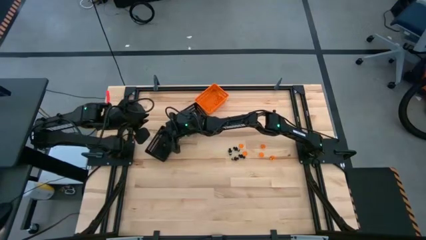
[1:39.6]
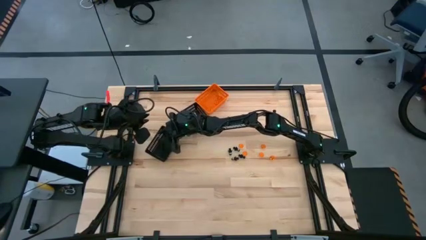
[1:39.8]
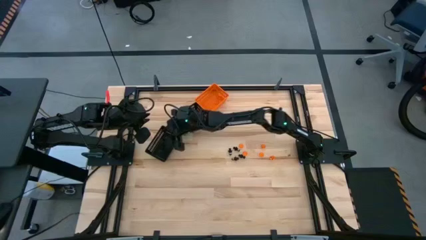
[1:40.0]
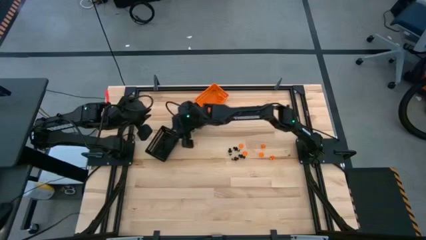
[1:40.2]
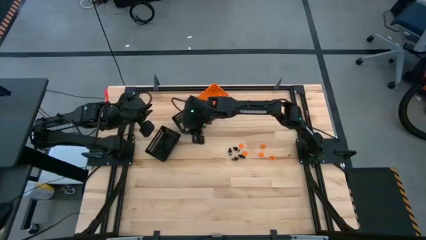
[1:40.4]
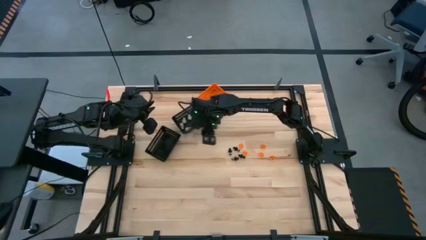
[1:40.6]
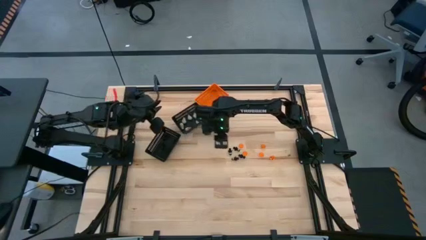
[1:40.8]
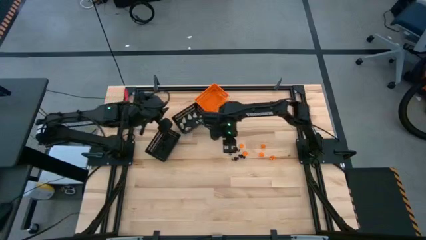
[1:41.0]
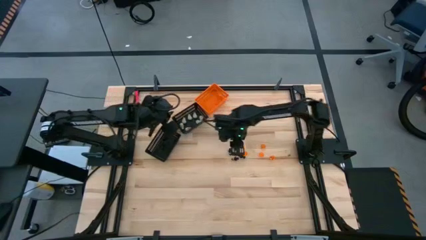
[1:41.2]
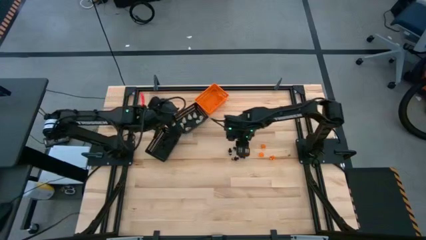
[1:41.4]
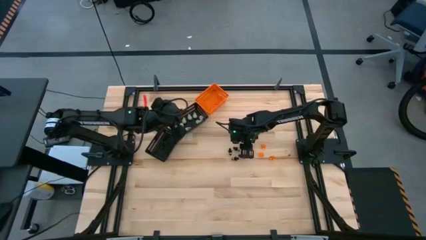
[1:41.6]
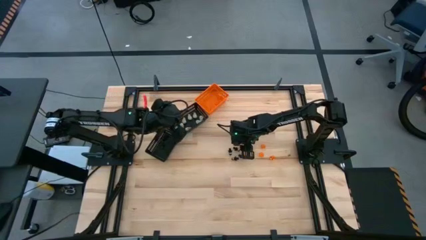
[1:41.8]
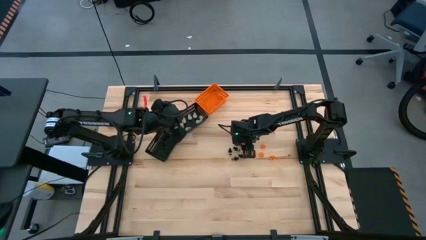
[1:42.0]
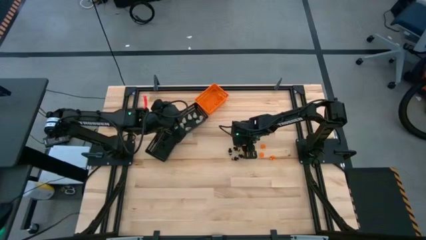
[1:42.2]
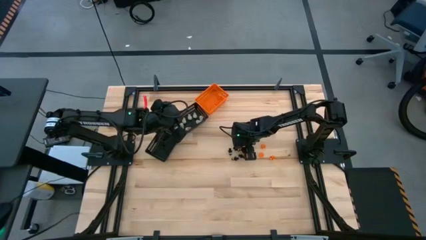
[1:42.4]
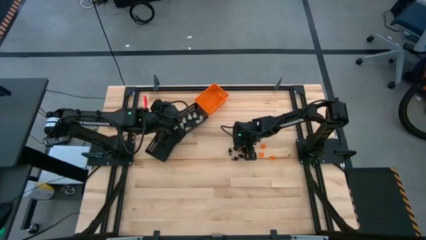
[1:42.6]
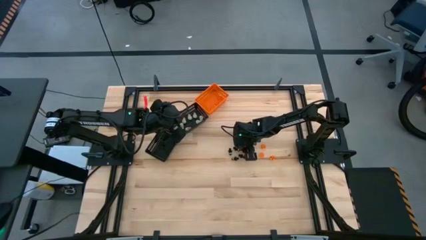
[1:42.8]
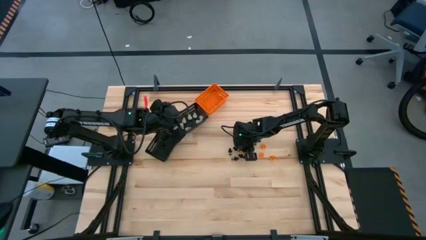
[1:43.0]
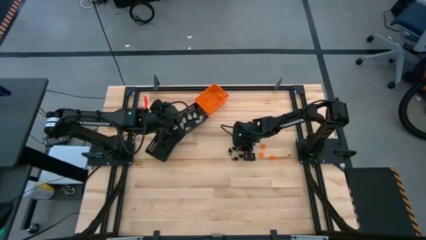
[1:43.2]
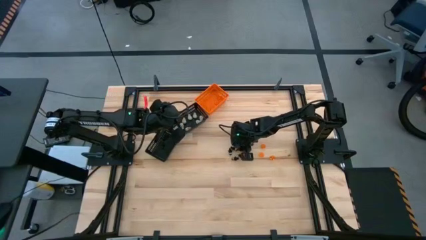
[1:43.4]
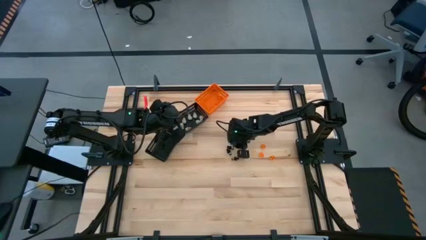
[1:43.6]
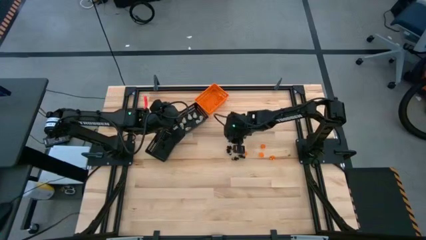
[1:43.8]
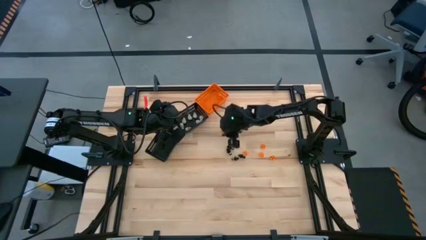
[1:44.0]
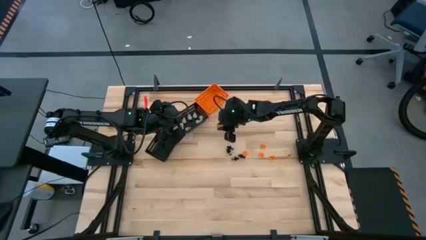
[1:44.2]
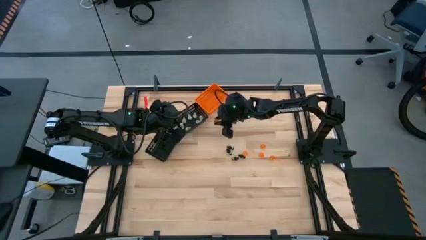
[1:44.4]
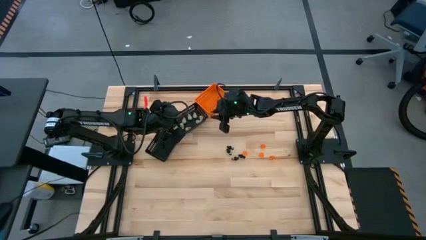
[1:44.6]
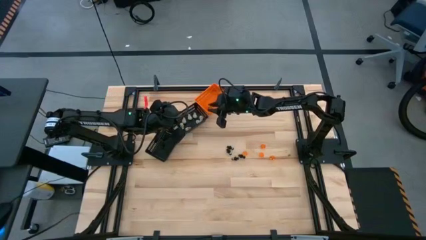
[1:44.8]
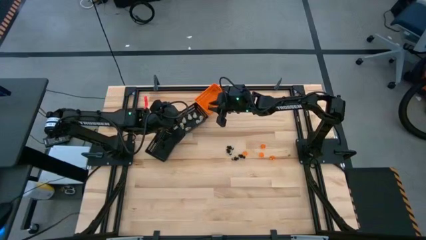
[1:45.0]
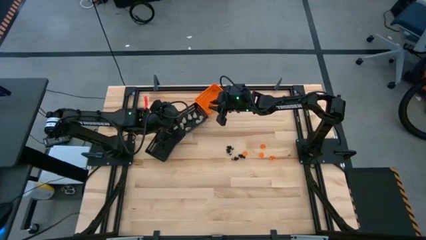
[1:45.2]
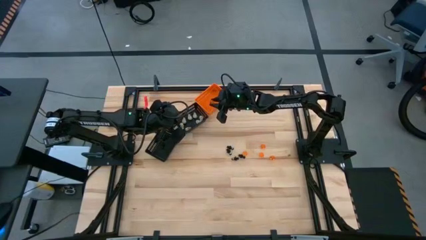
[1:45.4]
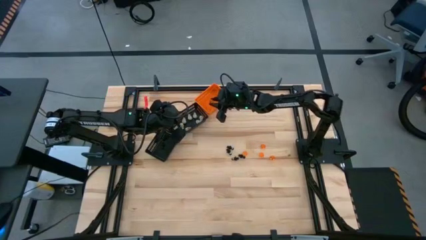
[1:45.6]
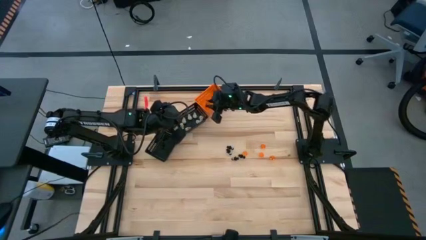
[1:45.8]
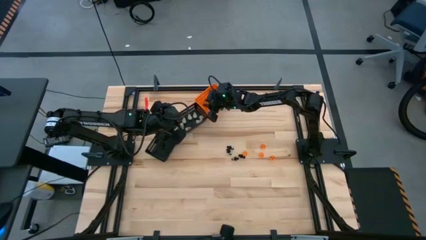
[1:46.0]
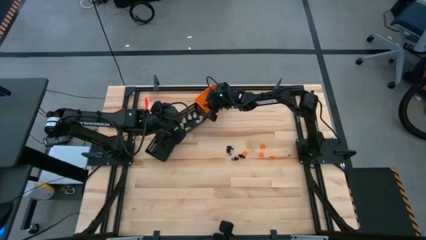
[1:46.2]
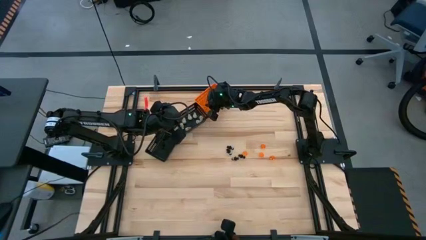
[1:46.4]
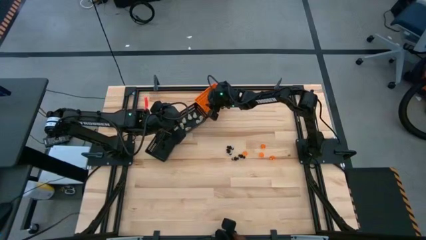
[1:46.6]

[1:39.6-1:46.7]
Task: Sort Halloween decoration
Put the orange pumpkin toy into the orange bin

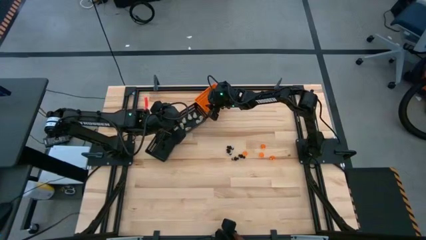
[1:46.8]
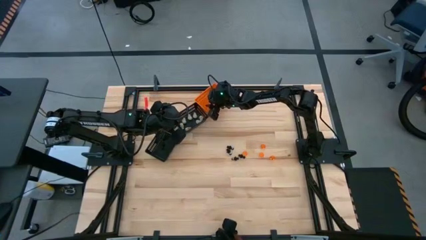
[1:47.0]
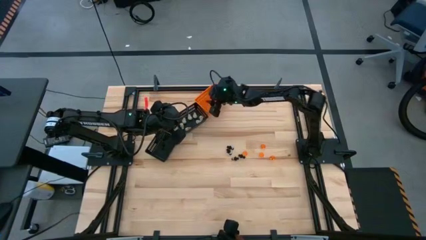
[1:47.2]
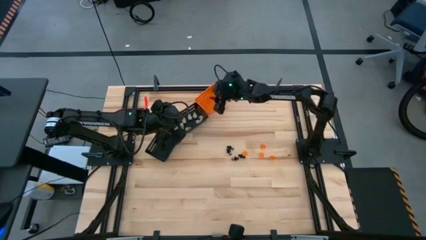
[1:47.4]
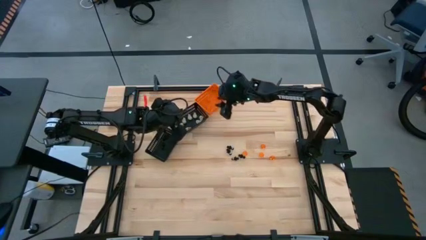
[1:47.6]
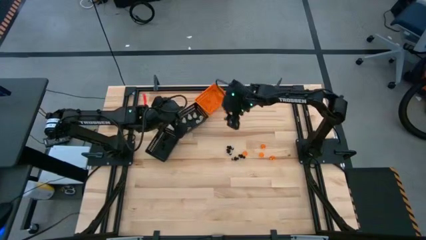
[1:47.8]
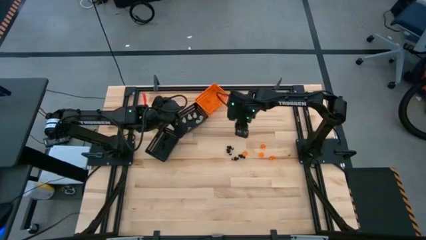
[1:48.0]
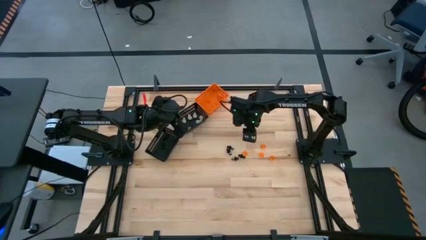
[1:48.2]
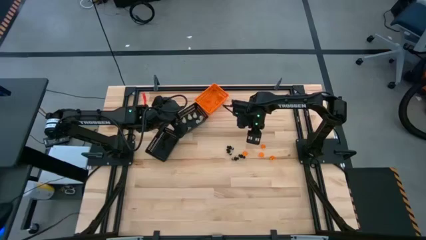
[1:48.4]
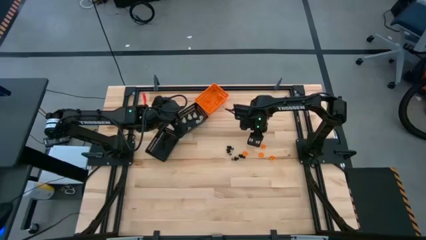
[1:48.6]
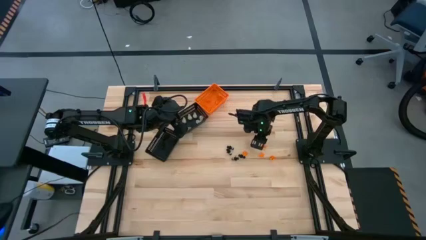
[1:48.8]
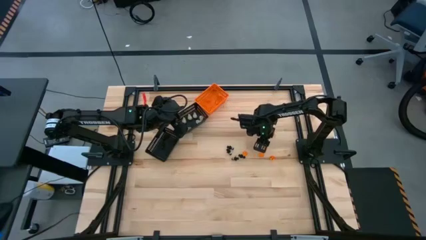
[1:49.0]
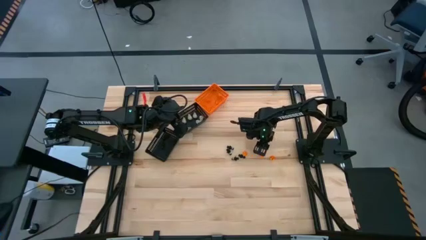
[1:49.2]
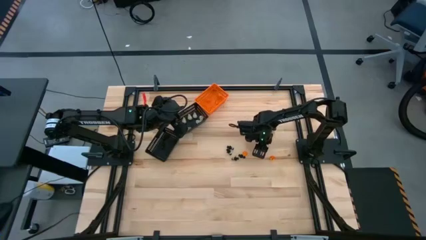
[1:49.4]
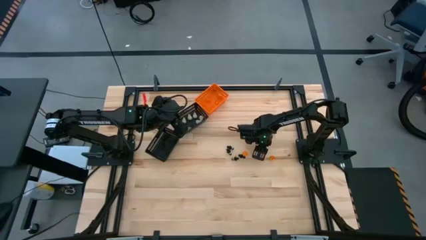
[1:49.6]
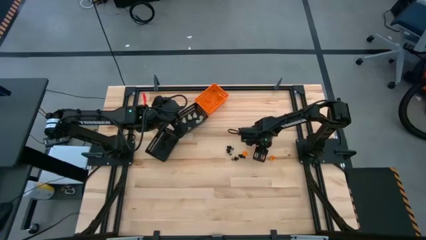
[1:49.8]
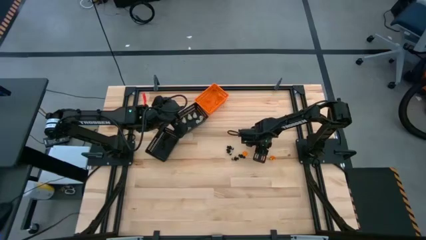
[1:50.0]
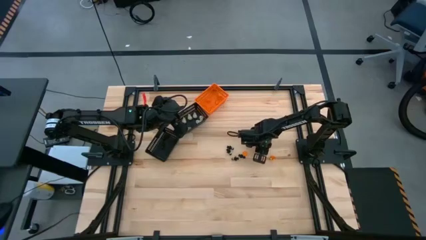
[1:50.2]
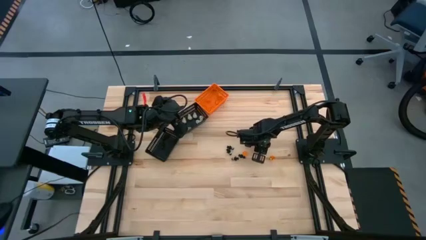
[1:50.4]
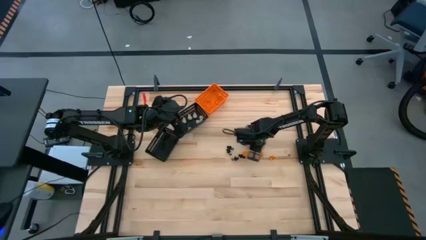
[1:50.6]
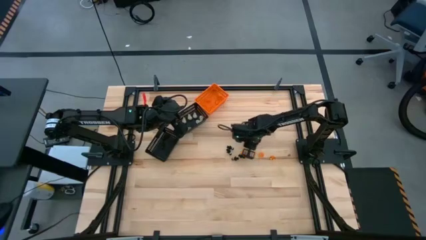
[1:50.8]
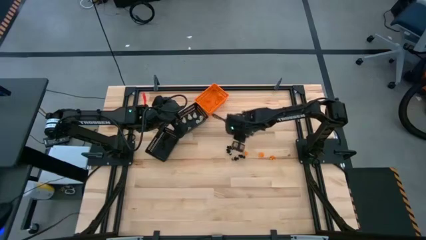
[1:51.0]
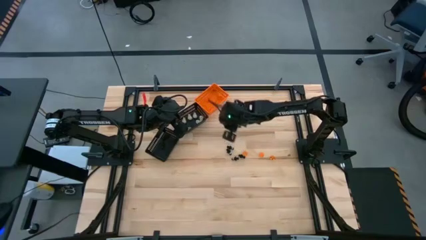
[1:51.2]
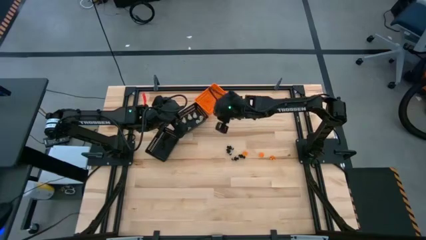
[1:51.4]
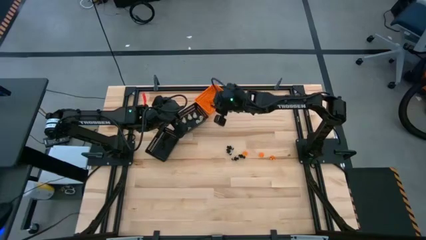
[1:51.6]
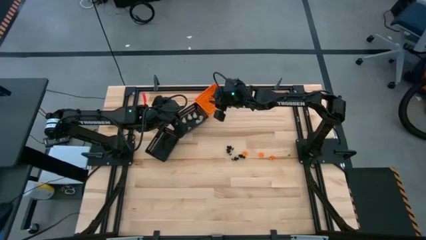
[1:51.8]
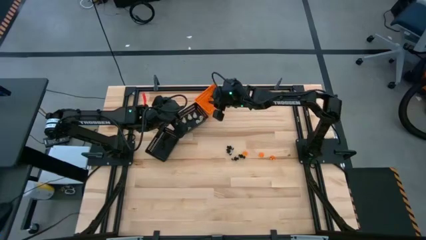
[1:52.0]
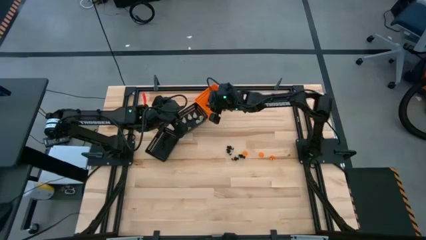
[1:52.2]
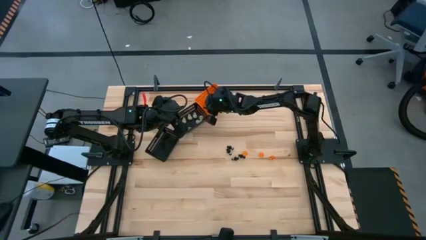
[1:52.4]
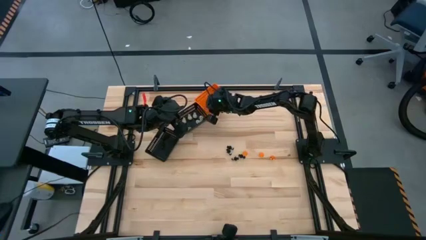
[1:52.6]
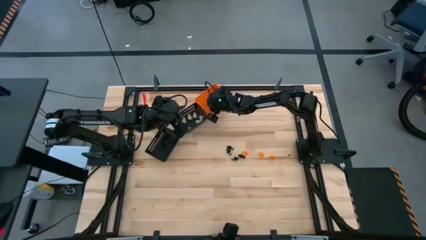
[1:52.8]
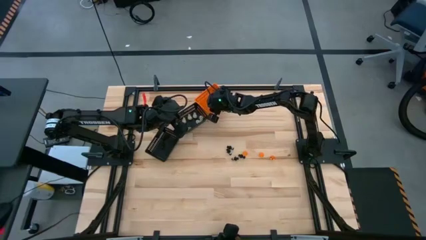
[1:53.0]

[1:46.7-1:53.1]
Put the orange pumpkin toy into the orange bin

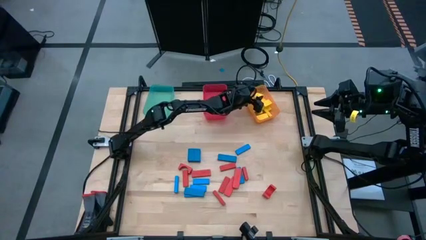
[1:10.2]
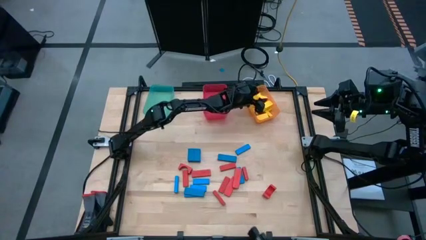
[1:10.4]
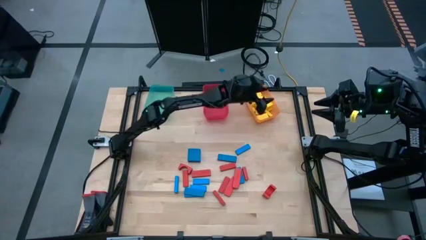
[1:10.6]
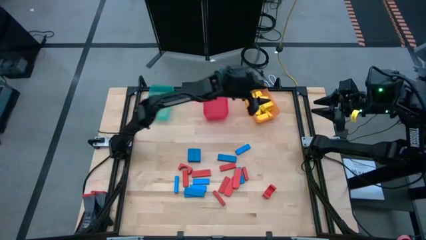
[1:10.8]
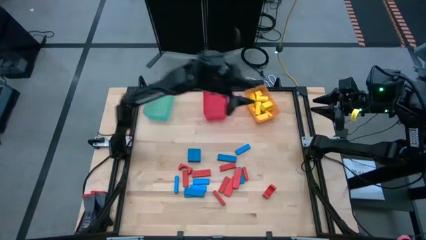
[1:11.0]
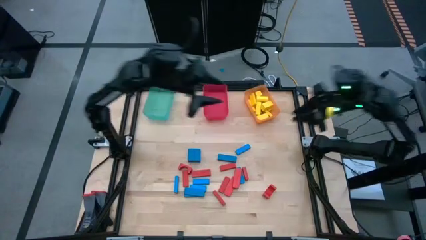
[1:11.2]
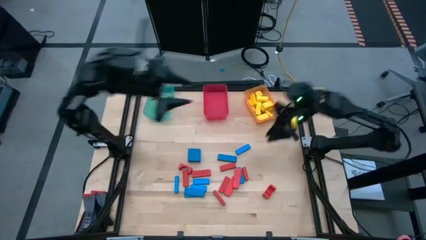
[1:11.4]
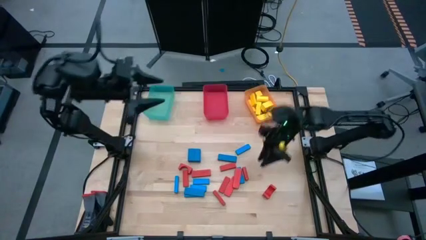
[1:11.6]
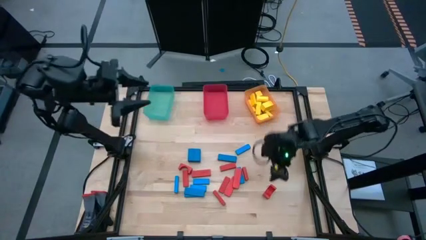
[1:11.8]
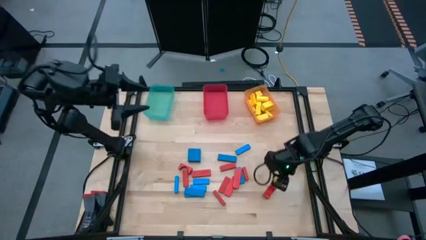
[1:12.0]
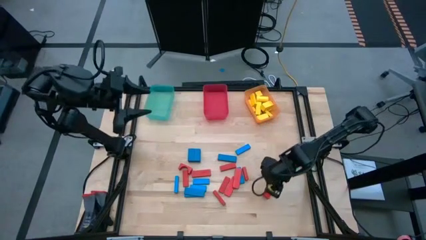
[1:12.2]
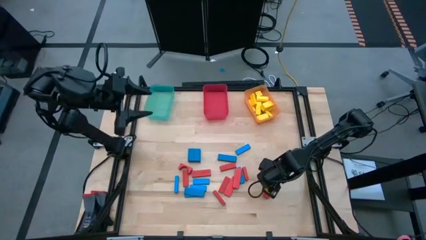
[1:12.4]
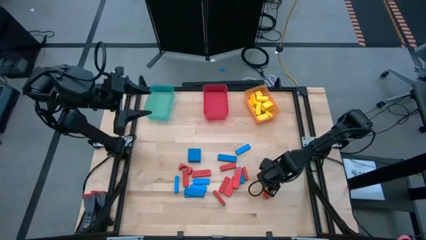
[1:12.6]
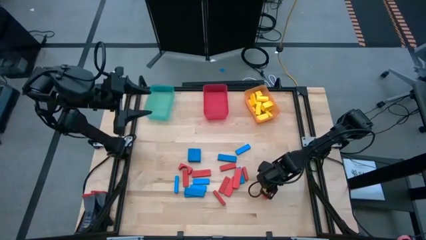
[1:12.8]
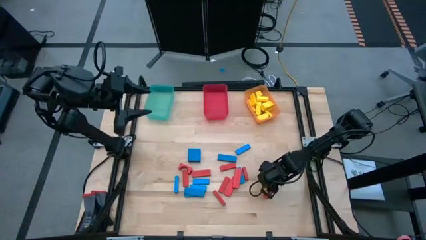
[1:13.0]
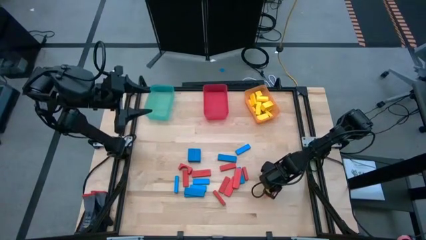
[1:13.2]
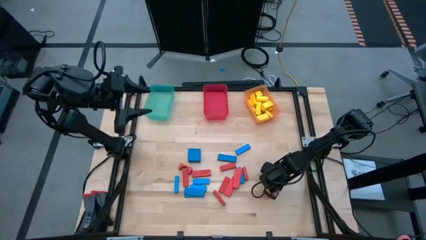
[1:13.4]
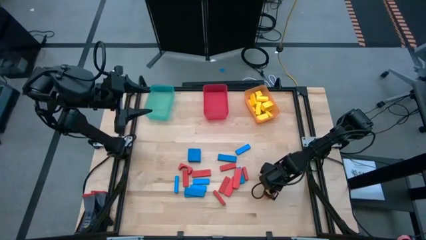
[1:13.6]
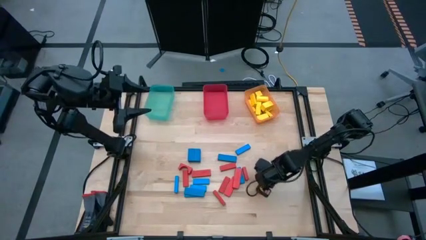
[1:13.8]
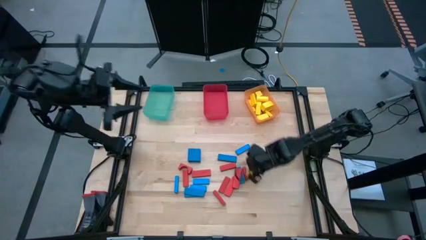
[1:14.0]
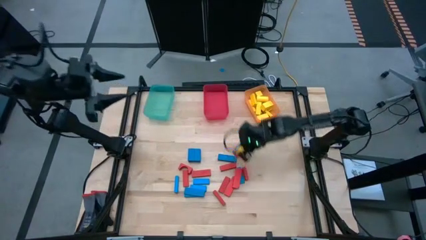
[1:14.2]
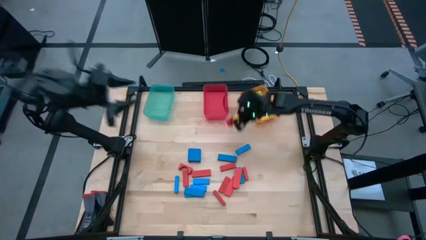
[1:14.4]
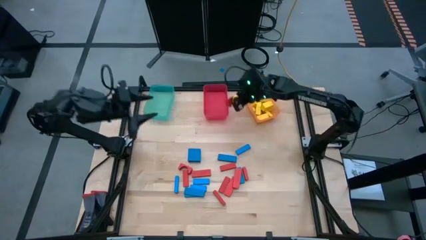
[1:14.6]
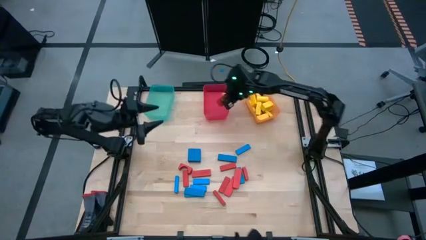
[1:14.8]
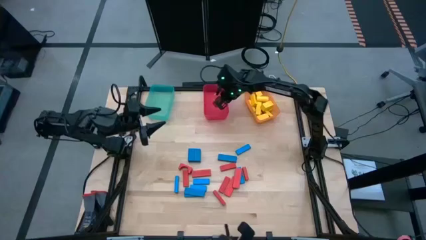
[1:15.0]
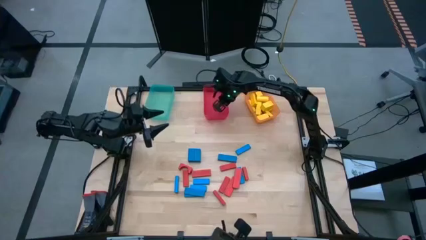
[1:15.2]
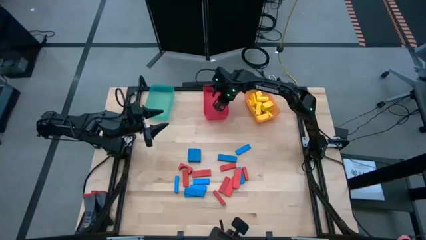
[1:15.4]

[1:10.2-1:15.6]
Task: Sort blocks
Put the red block into the red bin
